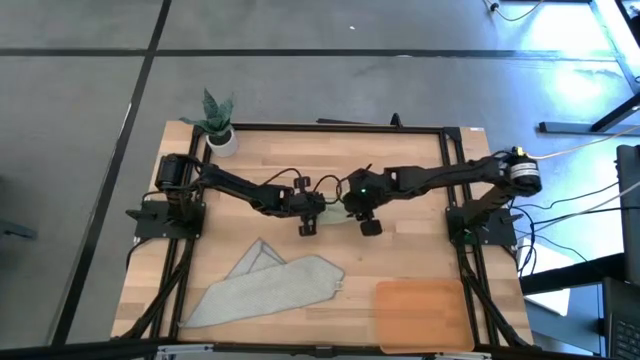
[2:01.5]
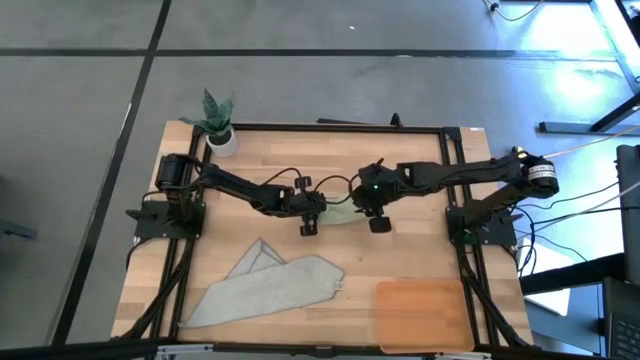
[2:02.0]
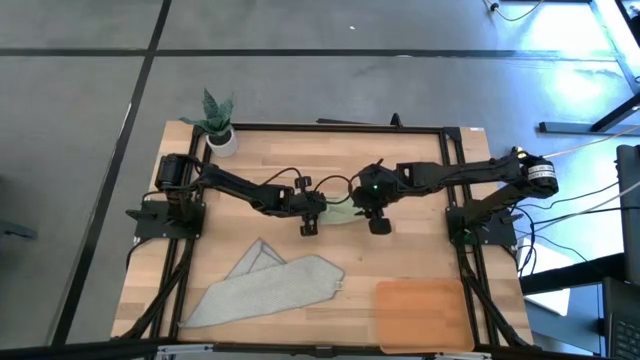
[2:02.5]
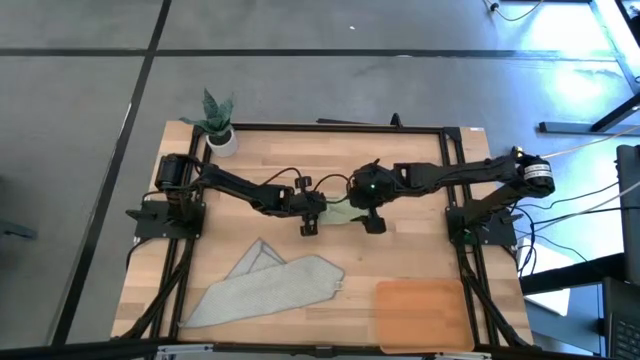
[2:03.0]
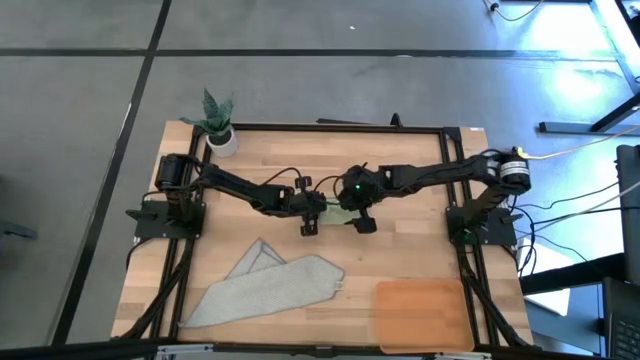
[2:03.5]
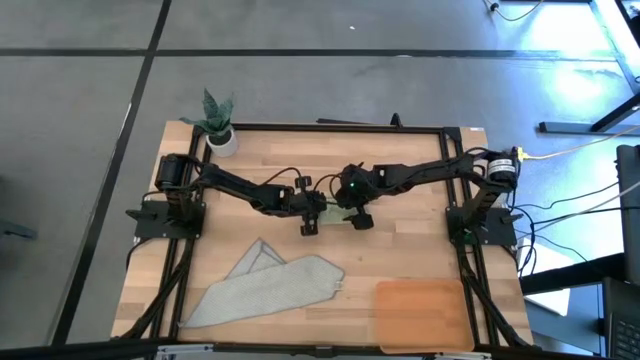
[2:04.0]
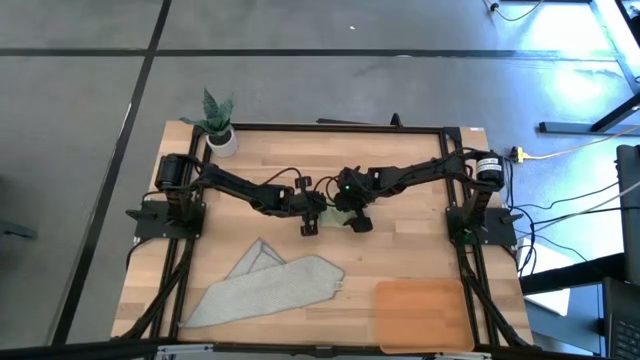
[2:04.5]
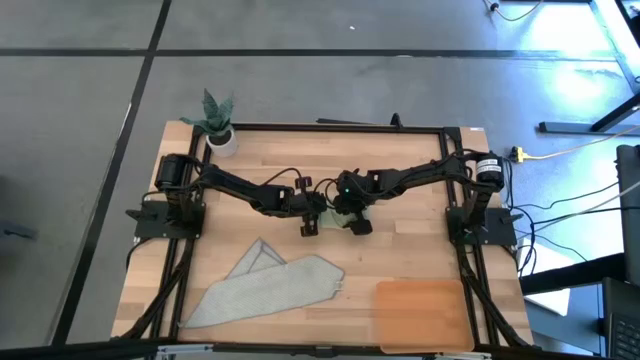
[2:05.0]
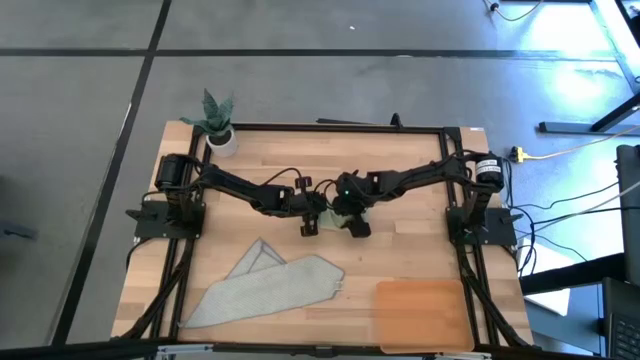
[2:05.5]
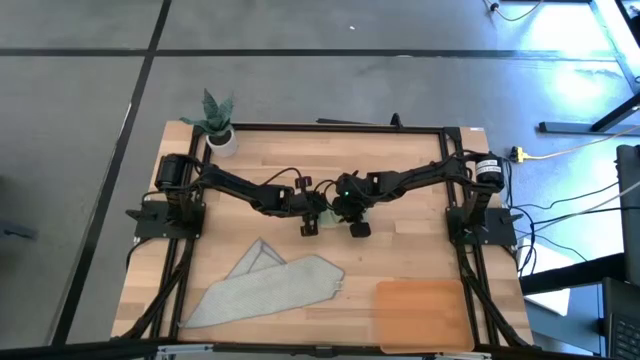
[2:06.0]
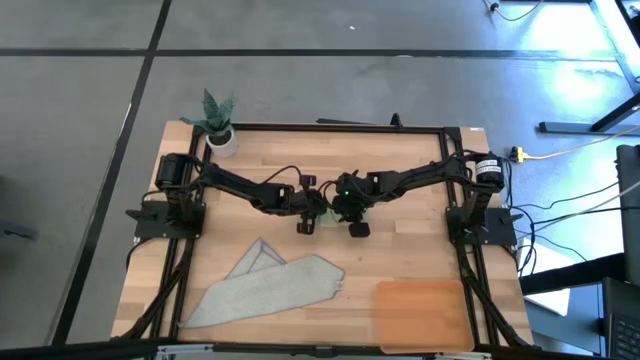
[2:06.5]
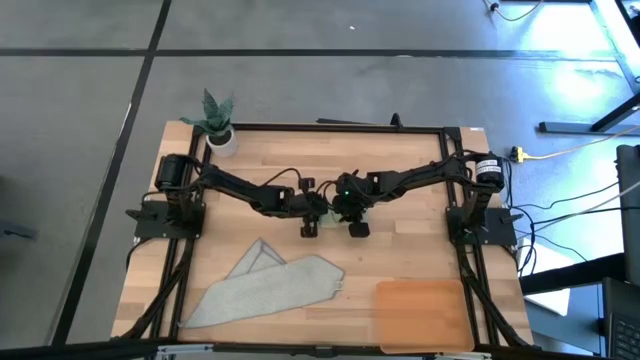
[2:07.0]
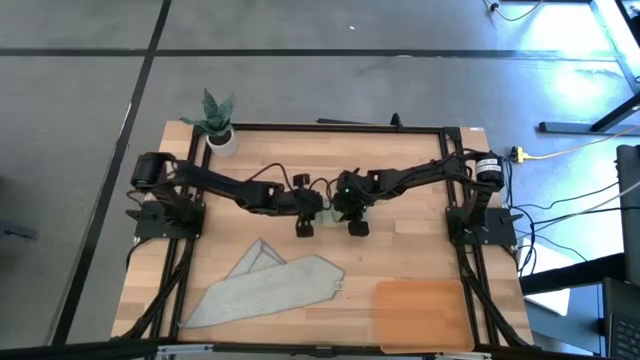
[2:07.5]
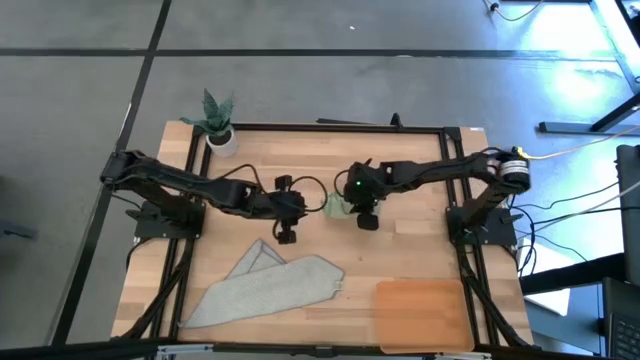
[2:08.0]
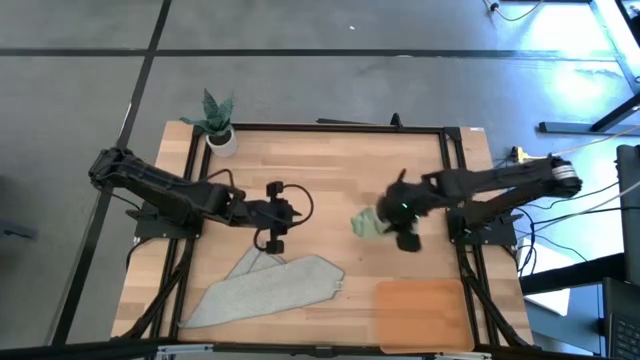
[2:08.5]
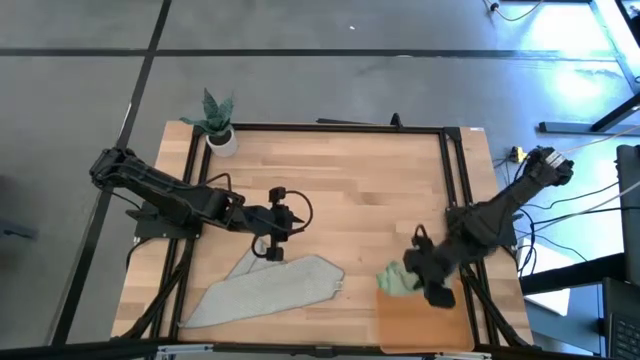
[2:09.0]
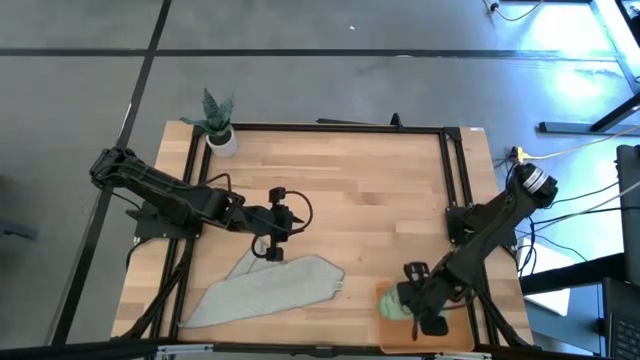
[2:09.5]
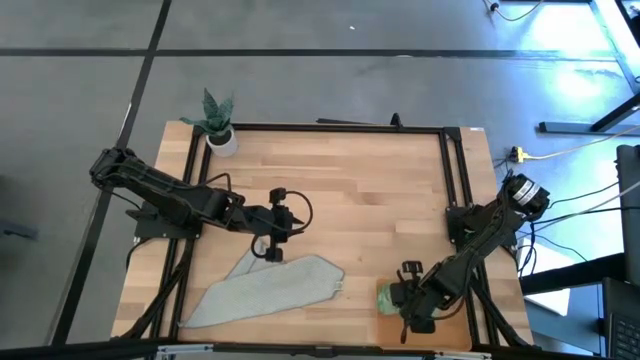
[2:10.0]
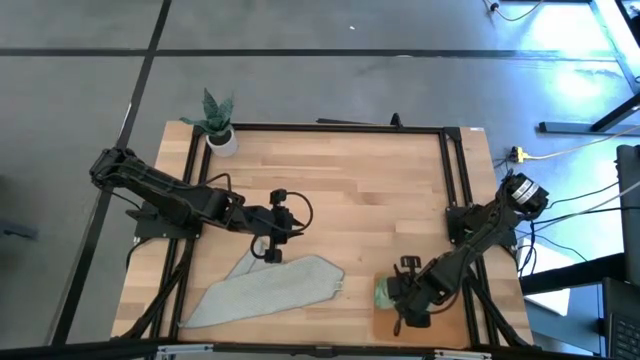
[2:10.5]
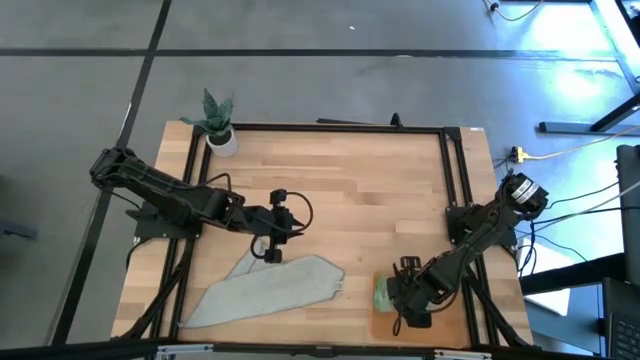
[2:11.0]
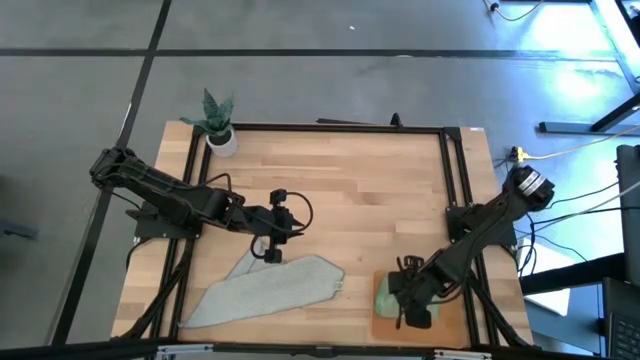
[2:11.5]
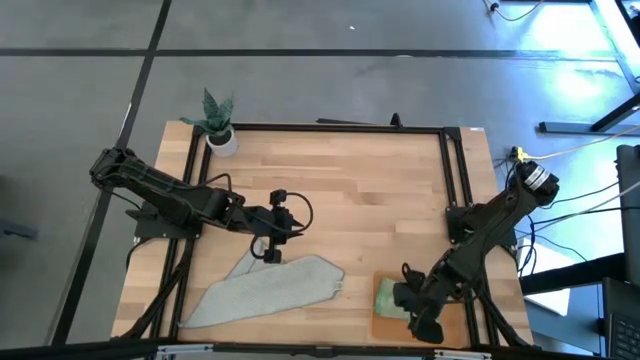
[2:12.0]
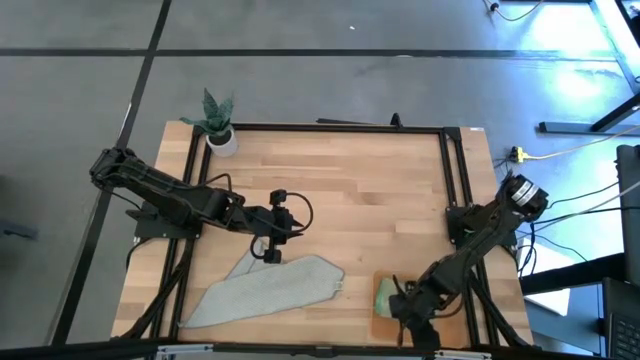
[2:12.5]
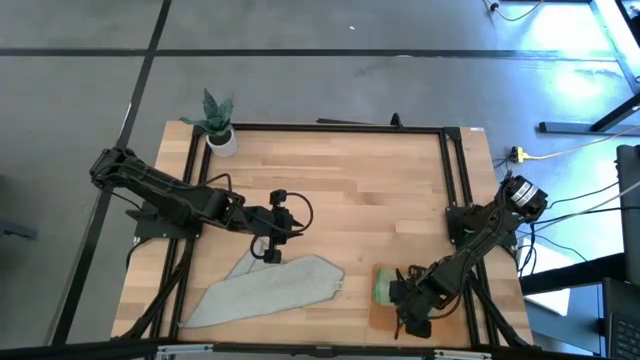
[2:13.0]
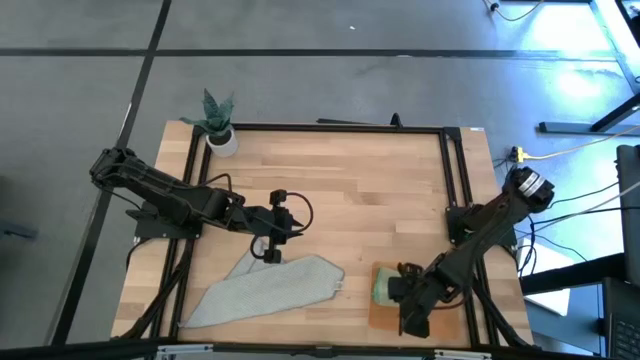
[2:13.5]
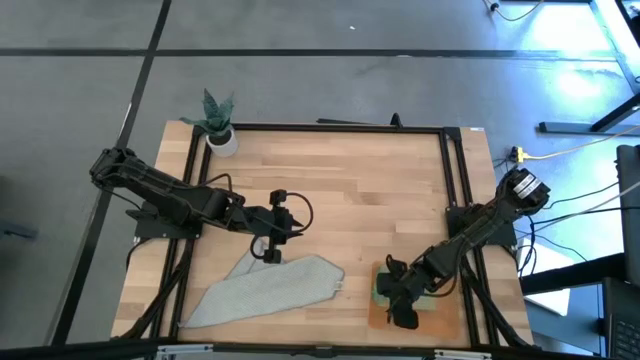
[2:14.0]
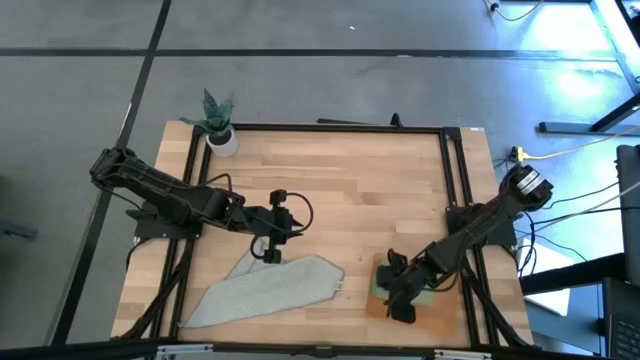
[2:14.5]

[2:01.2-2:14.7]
Task: Roll microfiber towels into tight, uniform cylinder then place into a basket
Put the rolled green microfiber towel into the orange bin

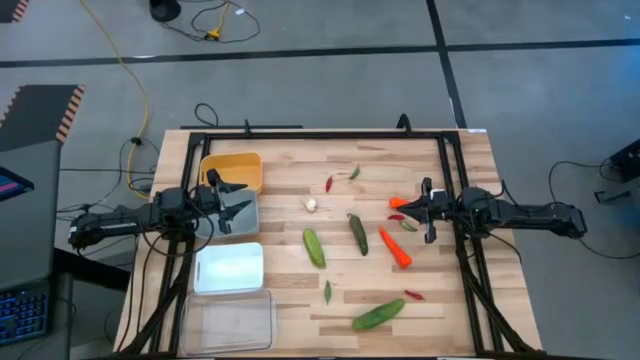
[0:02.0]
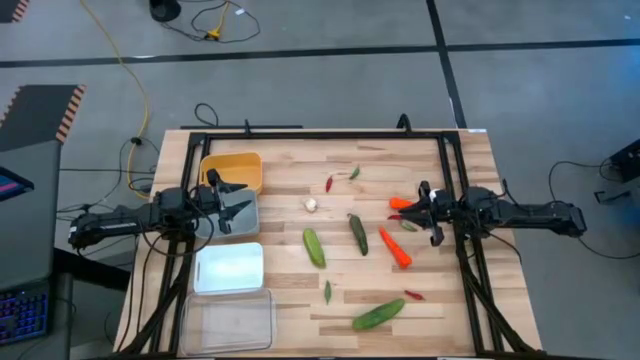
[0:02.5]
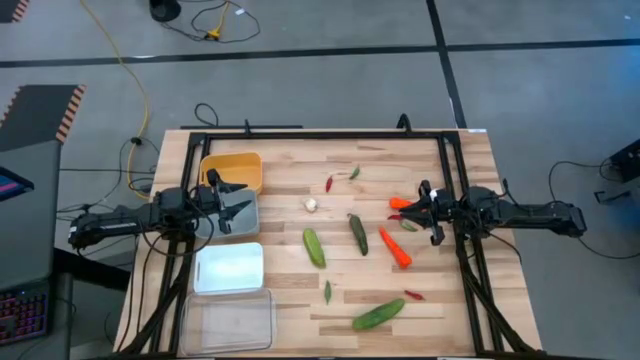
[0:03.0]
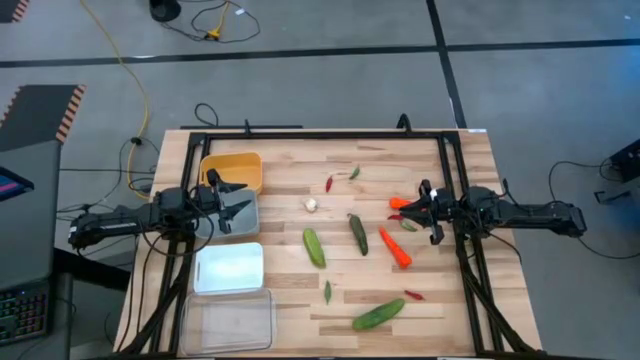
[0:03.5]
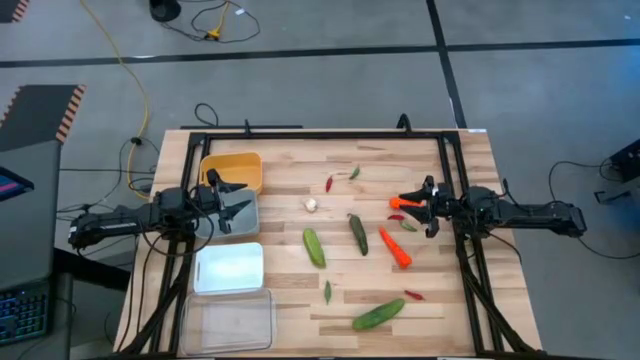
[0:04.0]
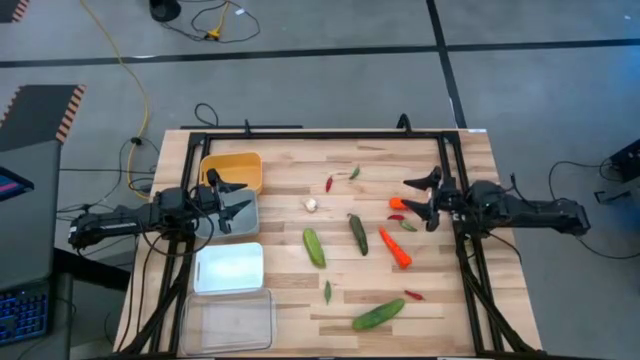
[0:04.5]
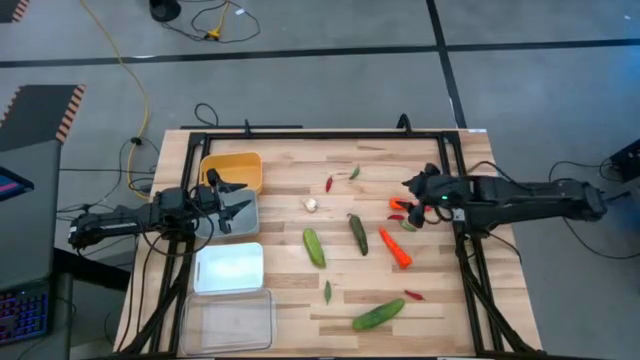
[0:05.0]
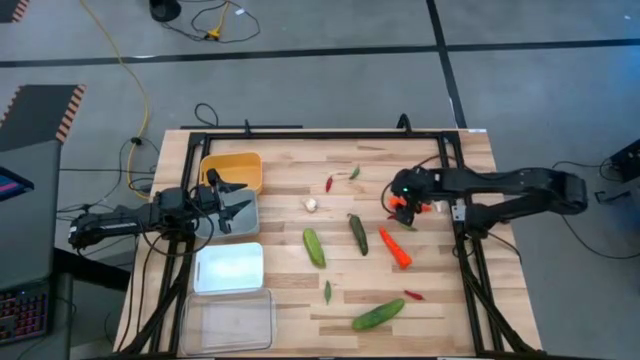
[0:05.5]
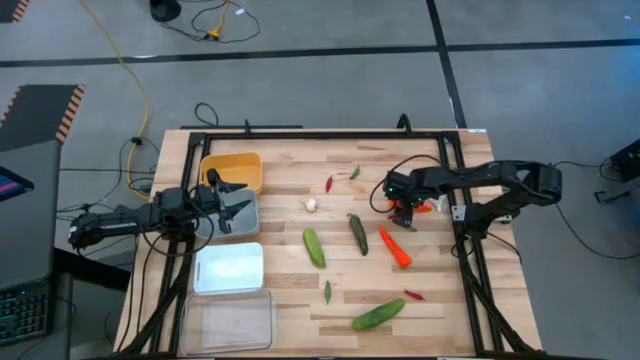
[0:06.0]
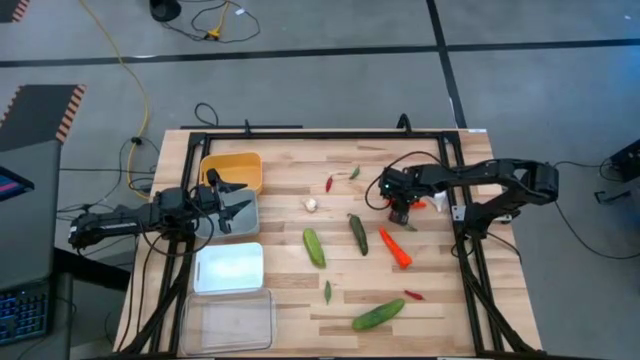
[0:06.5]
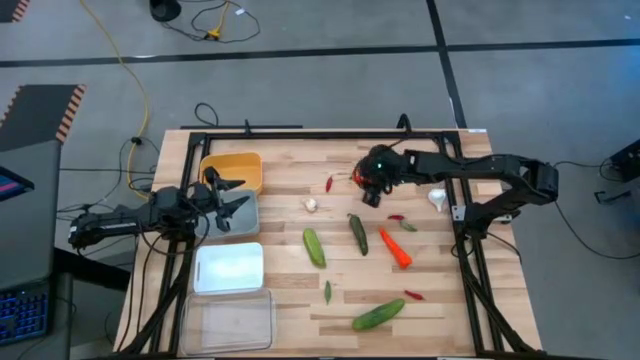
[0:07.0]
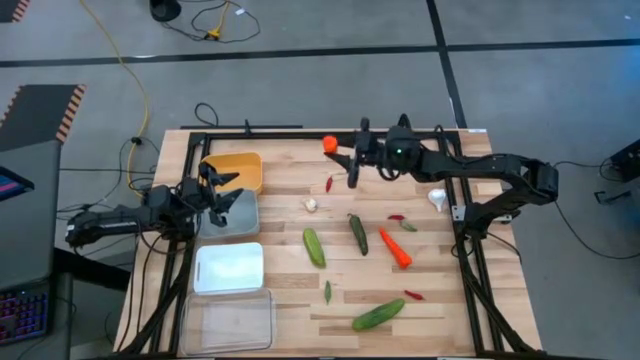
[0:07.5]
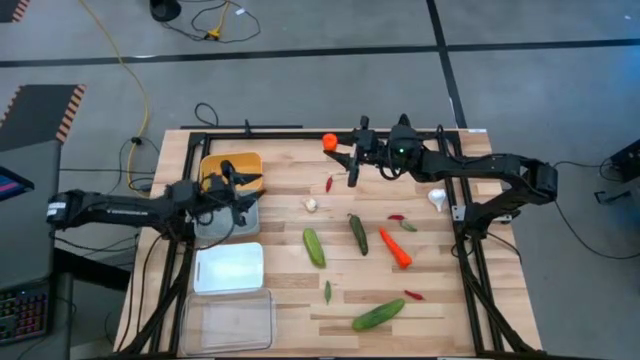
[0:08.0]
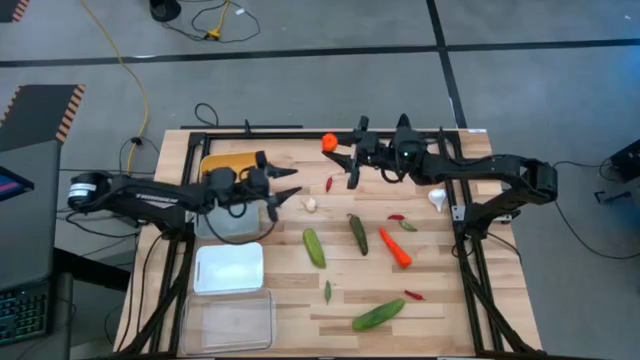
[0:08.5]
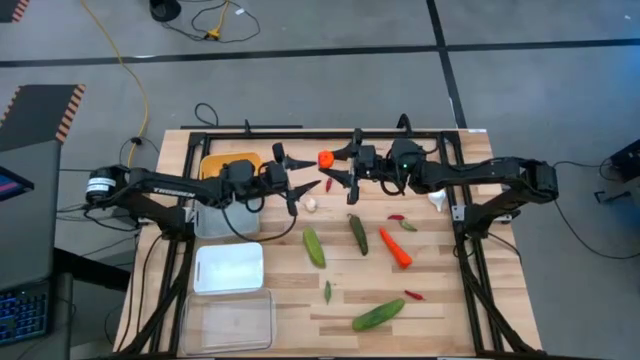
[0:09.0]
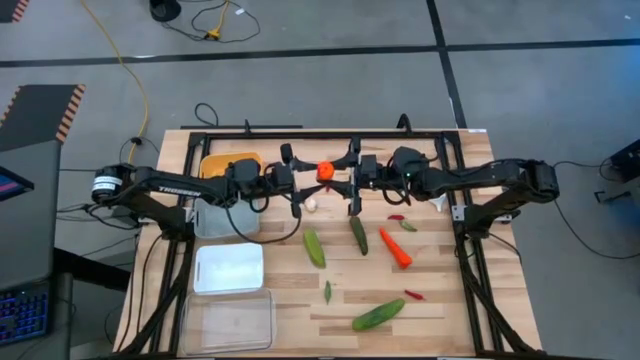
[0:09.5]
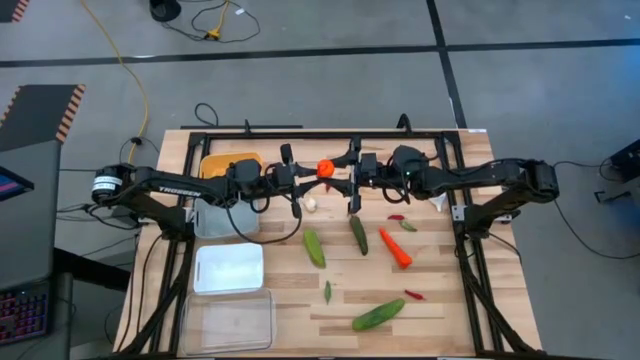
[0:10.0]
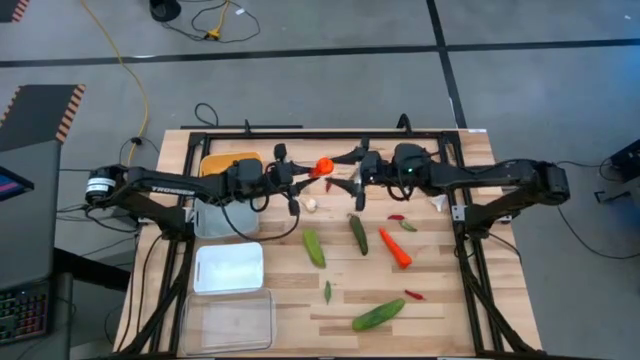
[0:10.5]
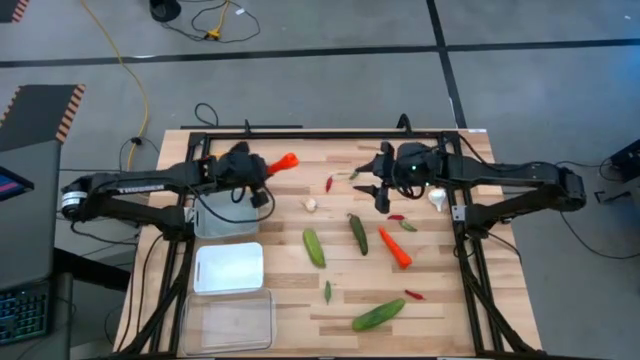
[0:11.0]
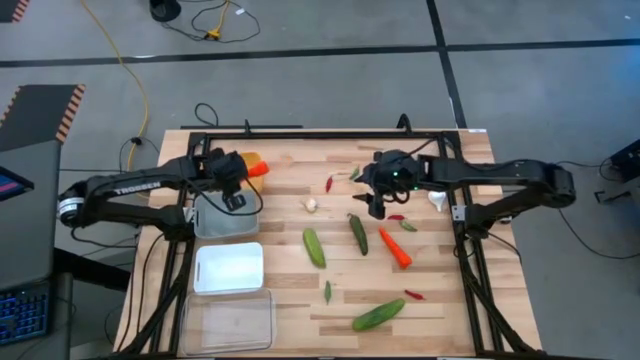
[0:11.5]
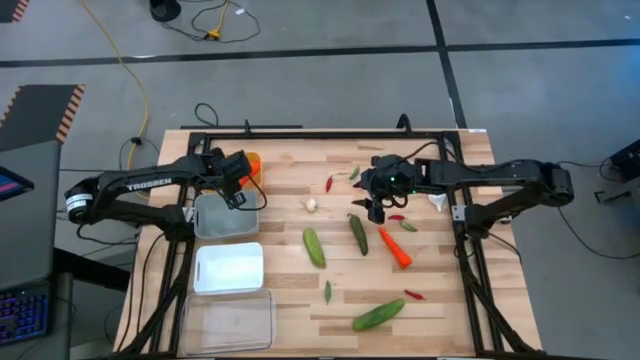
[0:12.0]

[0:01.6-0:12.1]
Task: Sort produce into baskets
Put the top carrot into the orange bin
